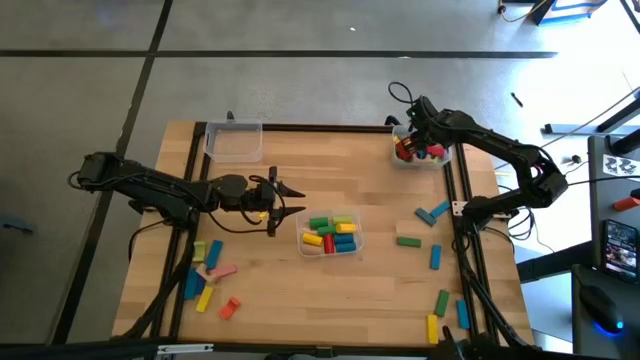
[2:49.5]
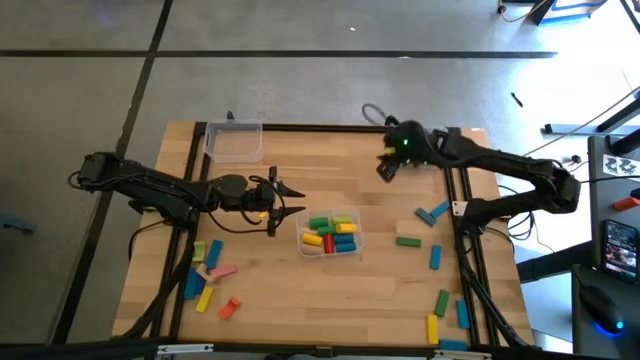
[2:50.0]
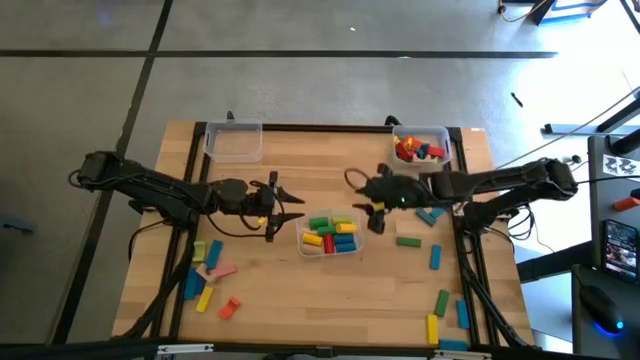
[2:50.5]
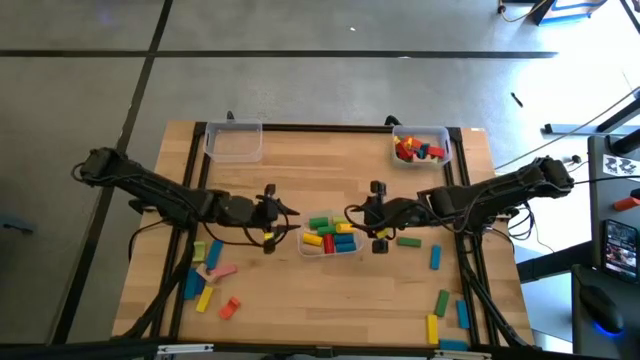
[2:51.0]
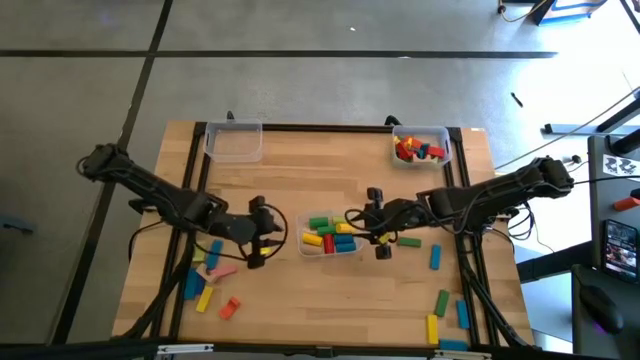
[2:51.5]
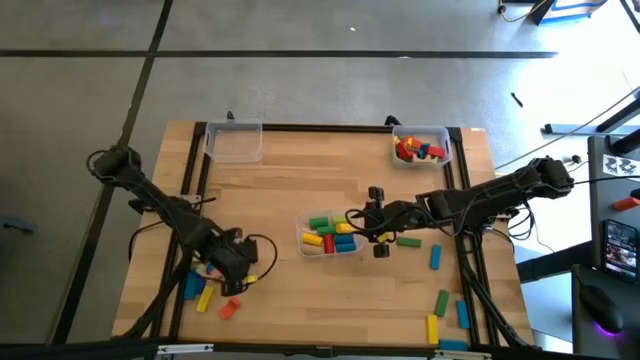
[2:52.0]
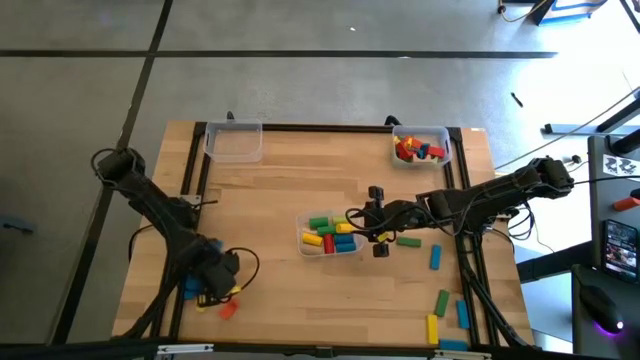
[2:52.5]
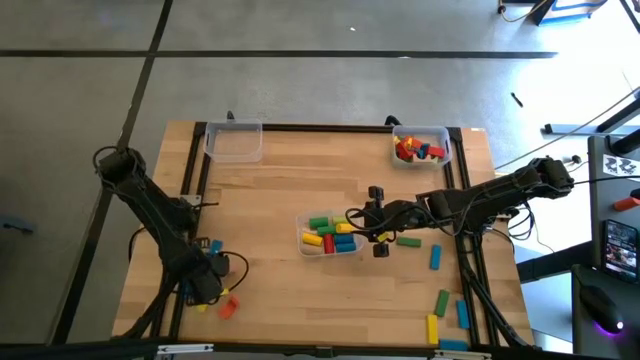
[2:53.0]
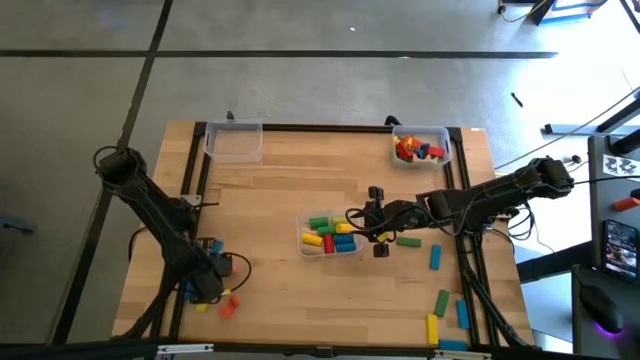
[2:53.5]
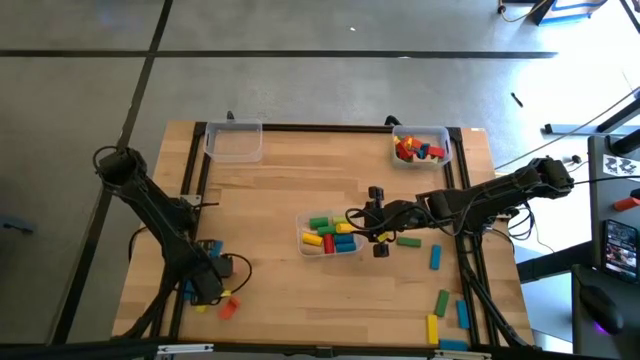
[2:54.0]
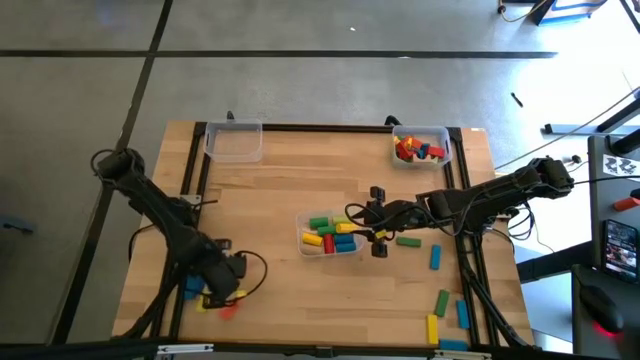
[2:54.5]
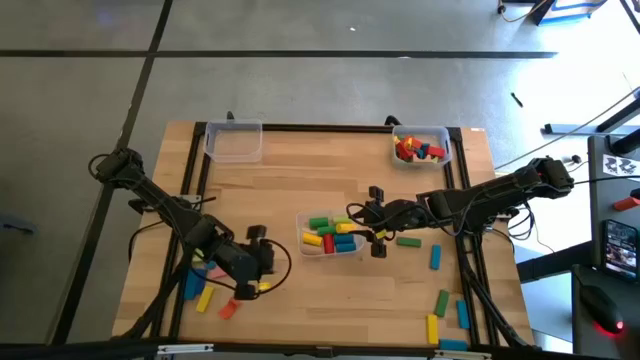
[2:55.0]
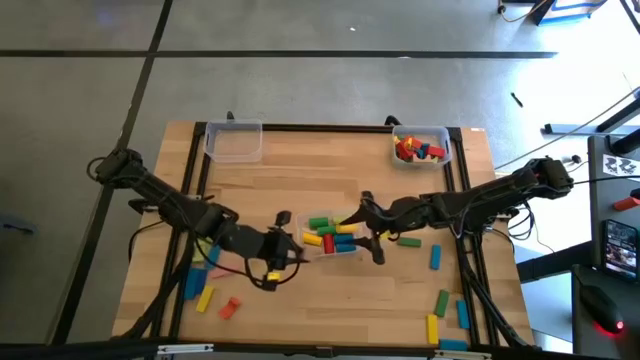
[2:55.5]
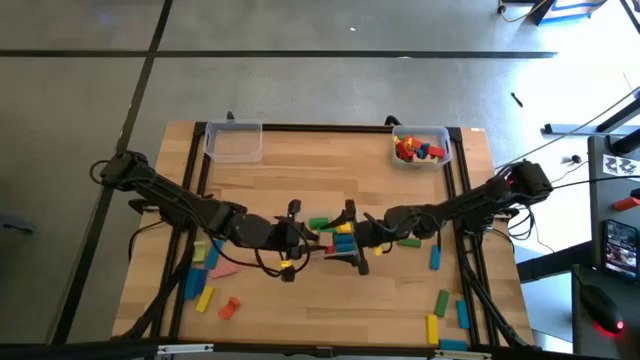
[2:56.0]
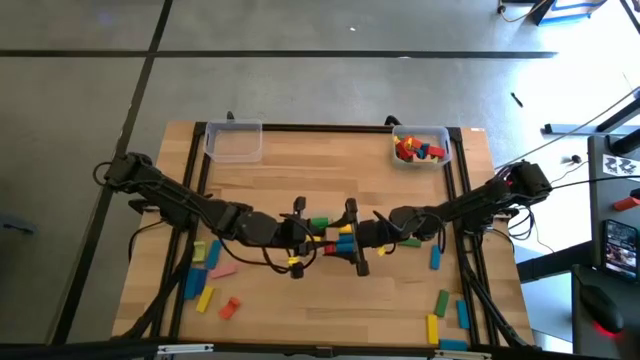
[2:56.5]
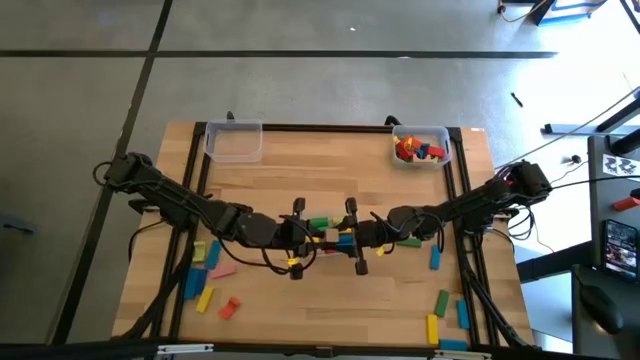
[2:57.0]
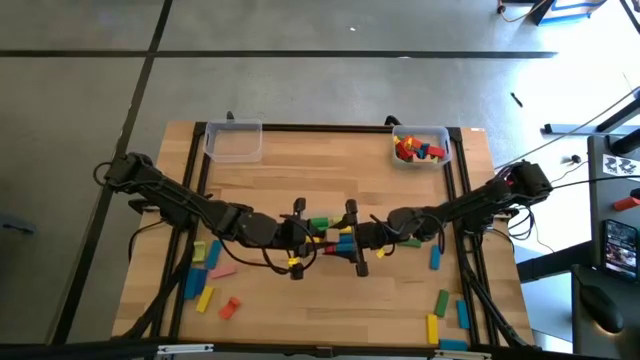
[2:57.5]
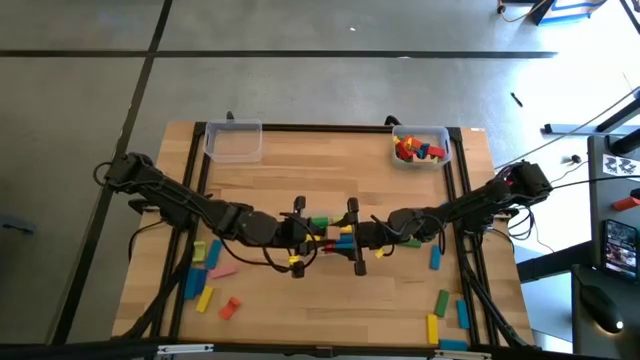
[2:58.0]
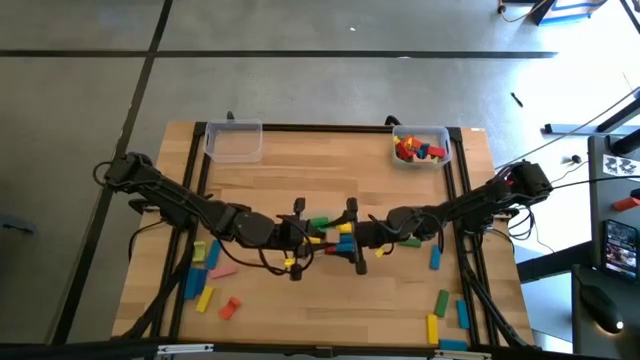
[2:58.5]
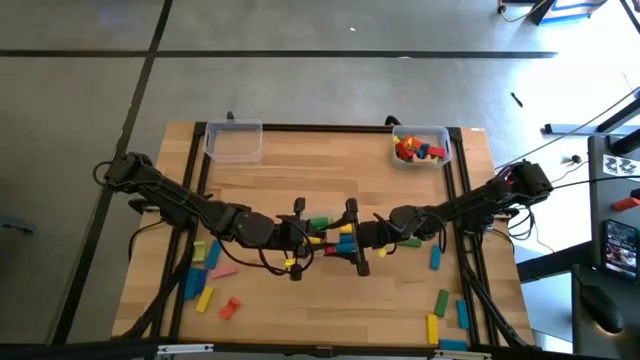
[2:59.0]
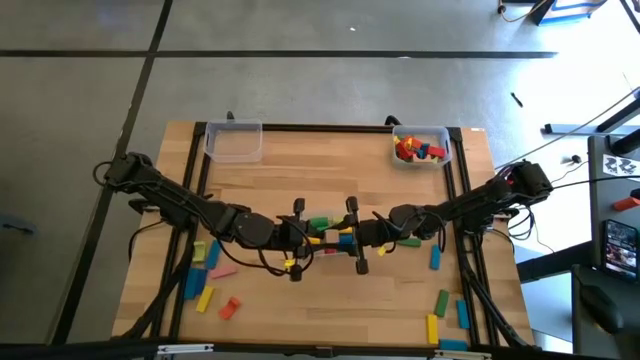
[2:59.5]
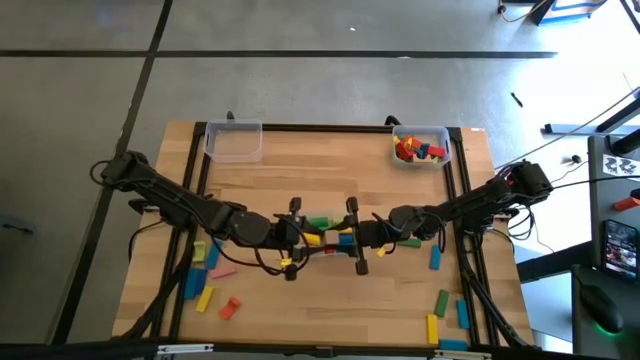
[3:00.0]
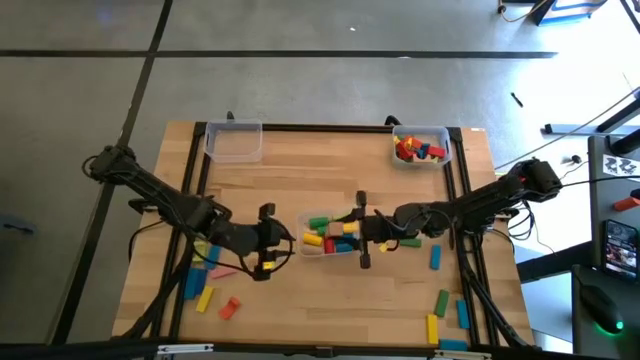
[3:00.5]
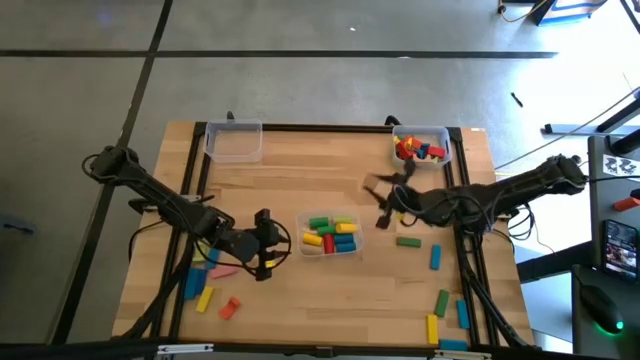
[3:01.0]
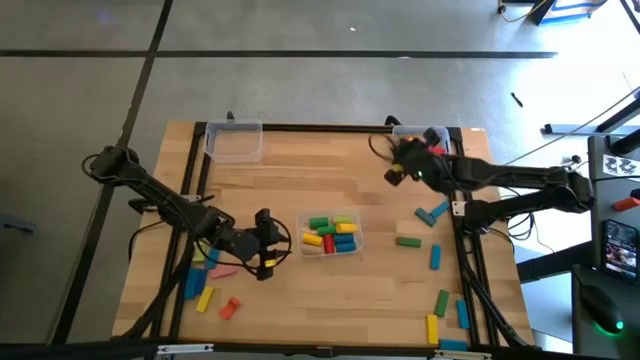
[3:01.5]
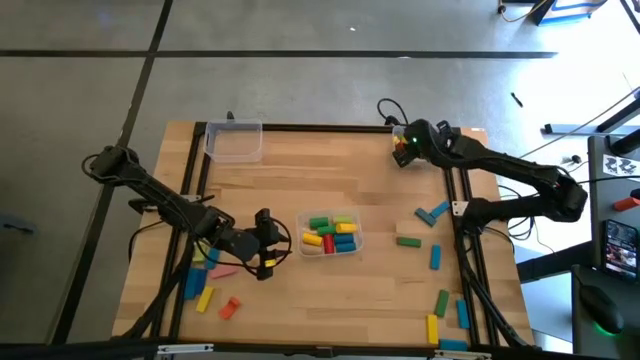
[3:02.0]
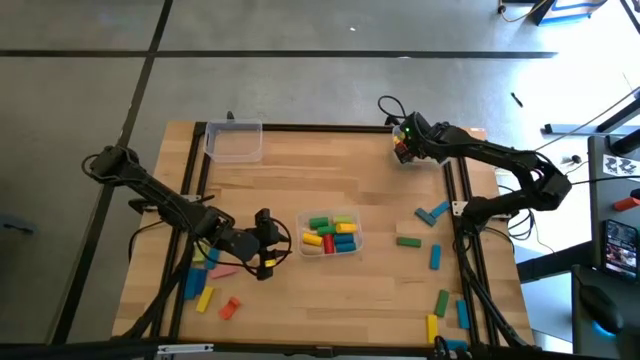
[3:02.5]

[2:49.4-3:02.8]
Task: Sort blocks by size
Put the light brown arch block into the top right transparent bin

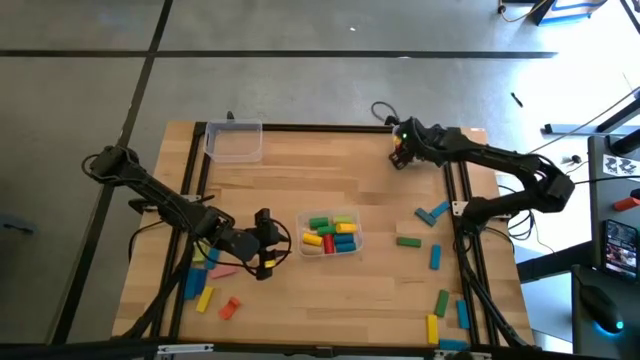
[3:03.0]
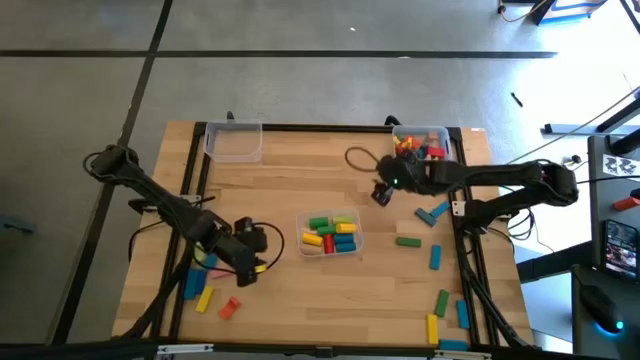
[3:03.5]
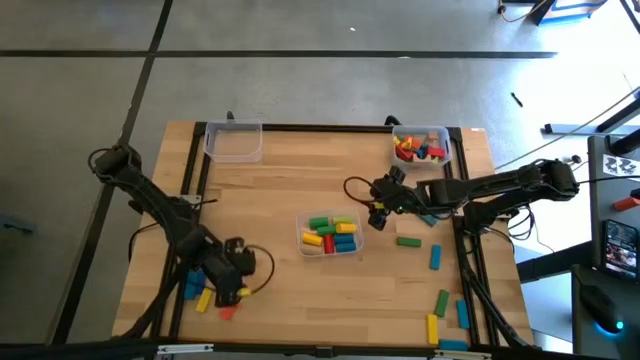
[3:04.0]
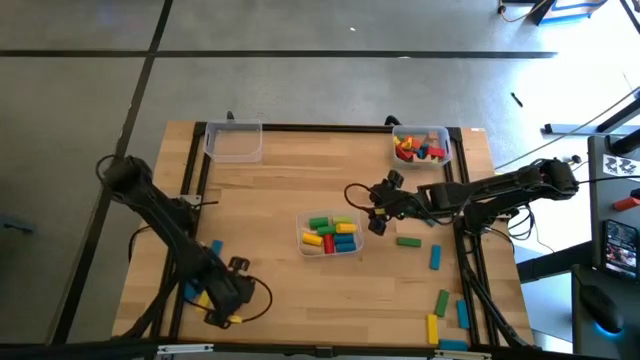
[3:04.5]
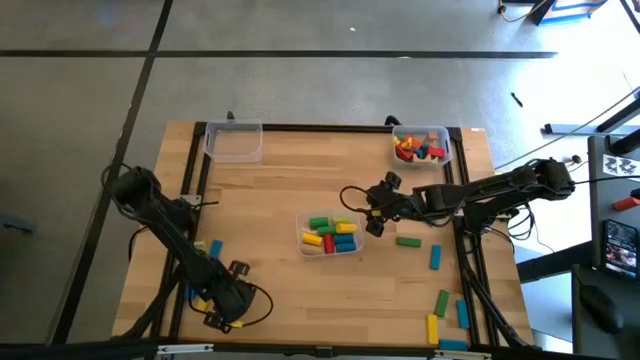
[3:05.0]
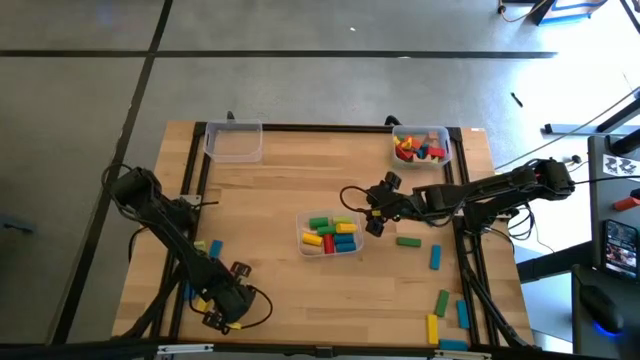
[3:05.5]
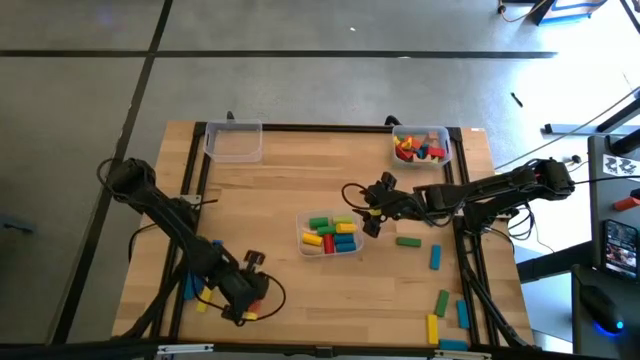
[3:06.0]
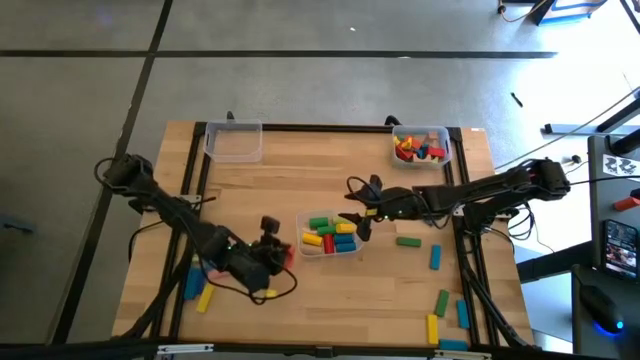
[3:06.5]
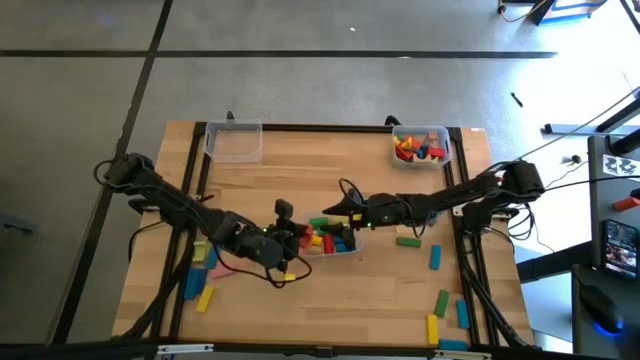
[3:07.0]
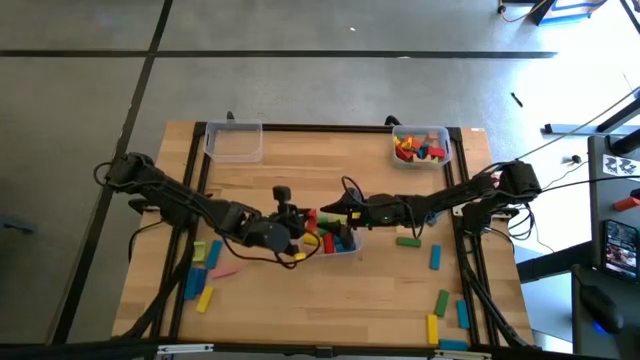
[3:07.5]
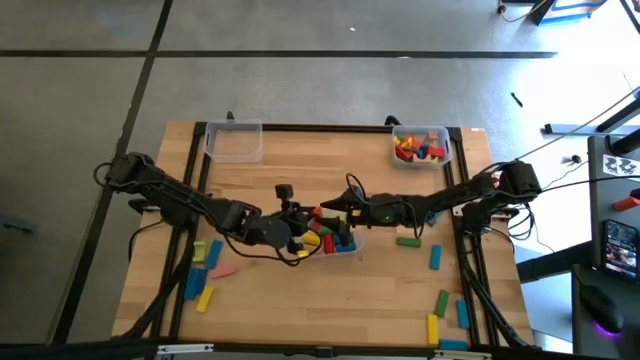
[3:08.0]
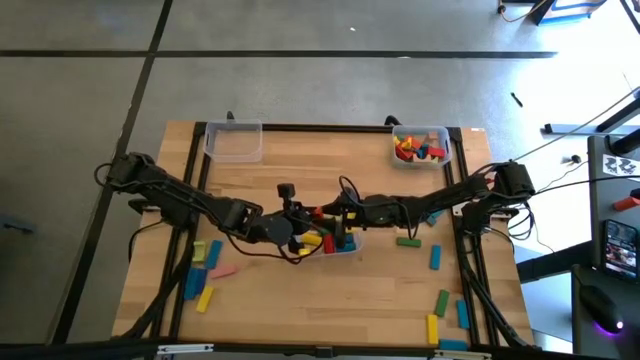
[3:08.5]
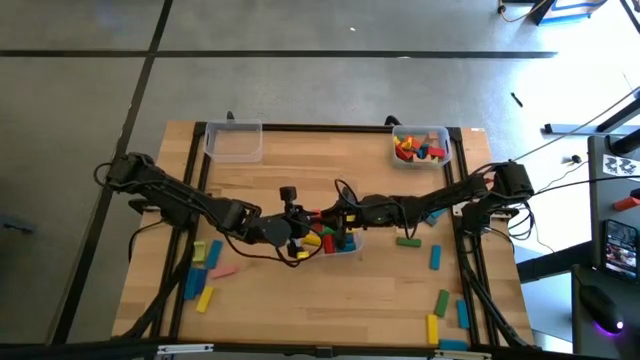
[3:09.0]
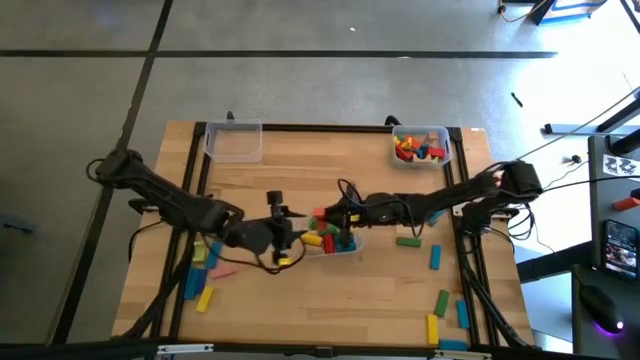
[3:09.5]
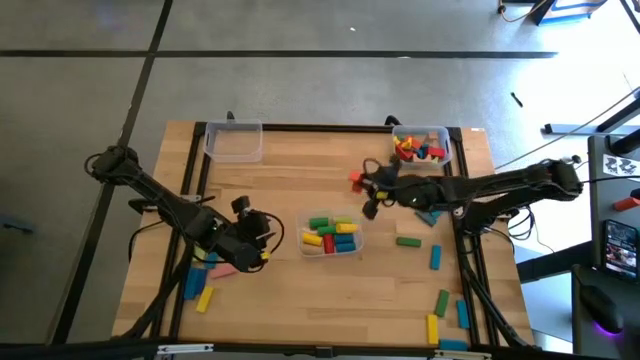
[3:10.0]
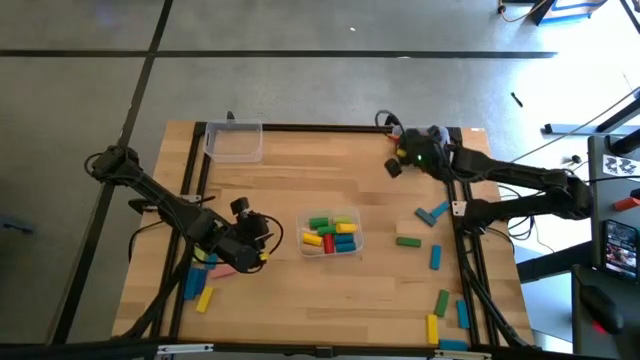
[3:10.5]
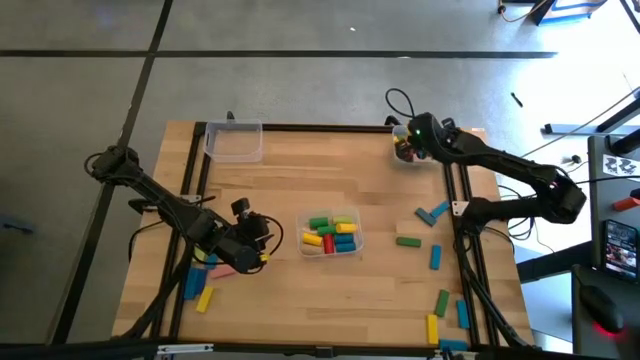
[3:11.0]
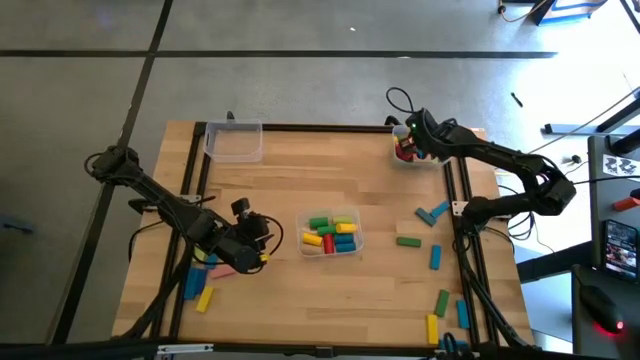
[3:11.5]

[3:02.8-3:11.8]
Put the orange arch block into the top right transparent bin
